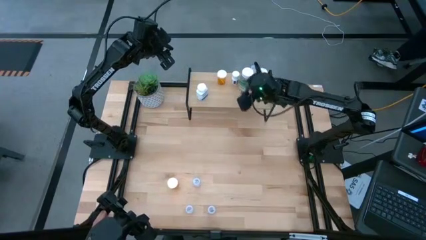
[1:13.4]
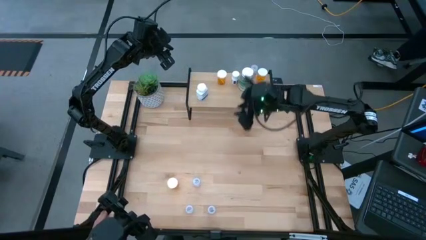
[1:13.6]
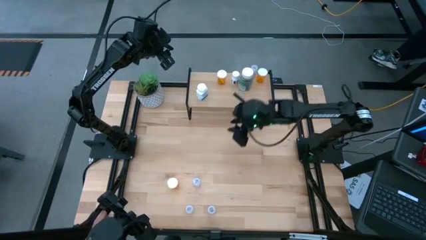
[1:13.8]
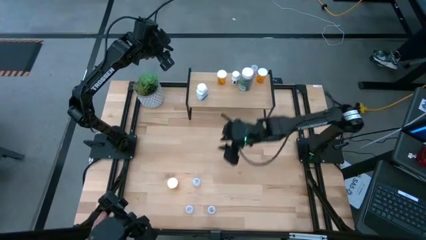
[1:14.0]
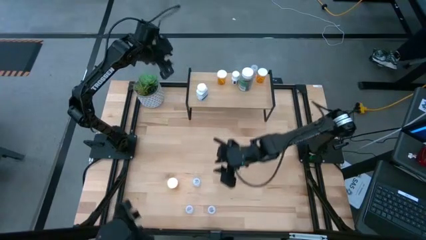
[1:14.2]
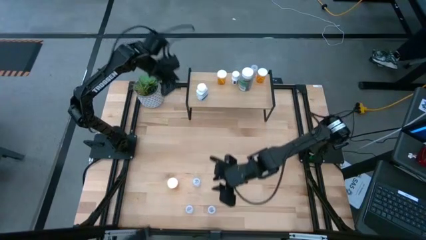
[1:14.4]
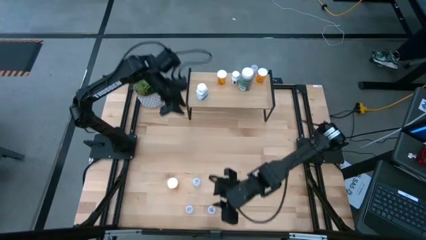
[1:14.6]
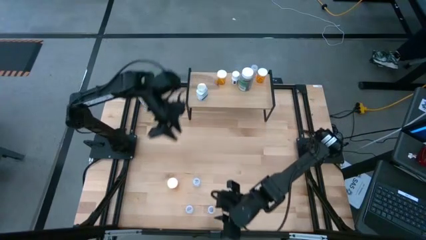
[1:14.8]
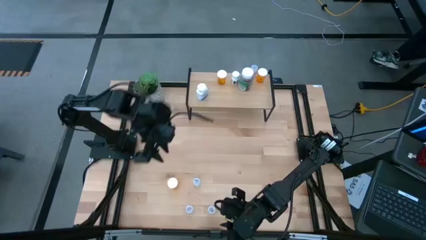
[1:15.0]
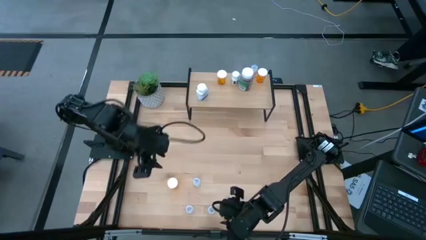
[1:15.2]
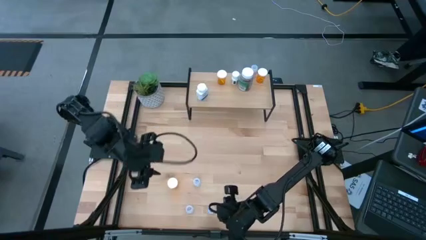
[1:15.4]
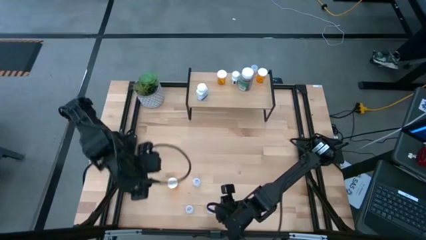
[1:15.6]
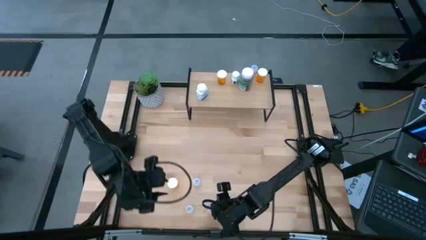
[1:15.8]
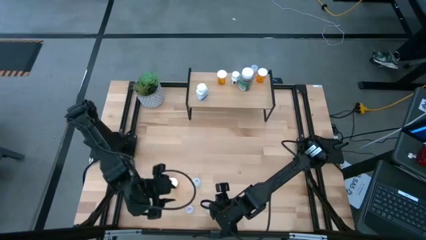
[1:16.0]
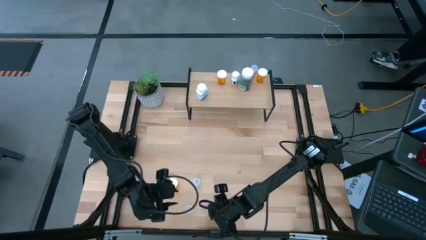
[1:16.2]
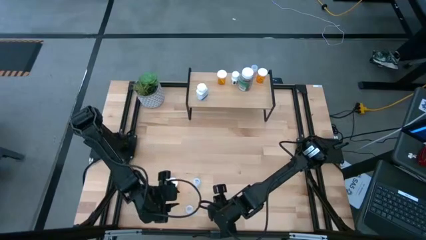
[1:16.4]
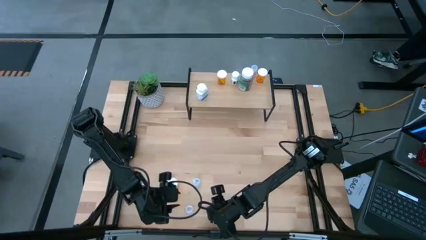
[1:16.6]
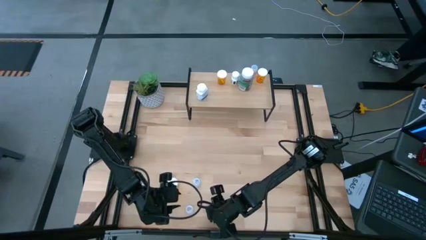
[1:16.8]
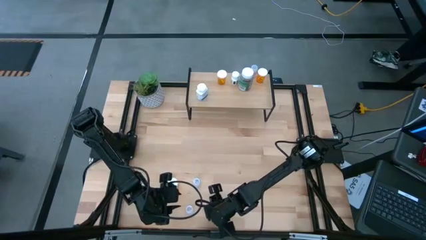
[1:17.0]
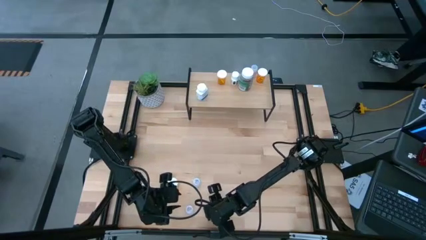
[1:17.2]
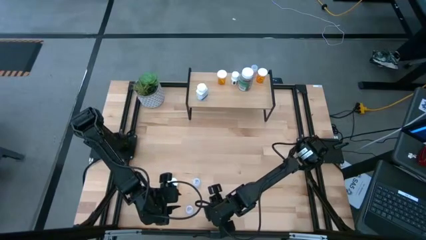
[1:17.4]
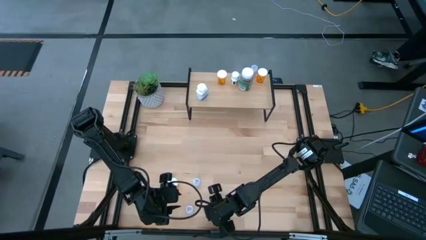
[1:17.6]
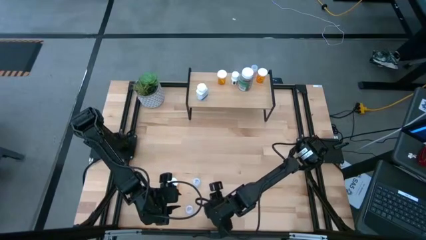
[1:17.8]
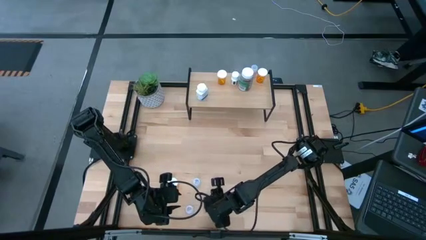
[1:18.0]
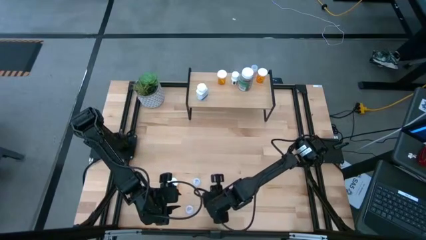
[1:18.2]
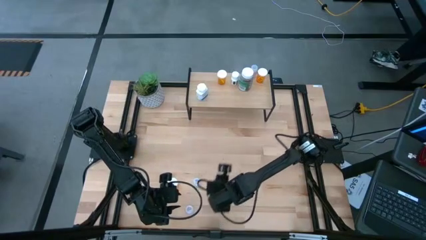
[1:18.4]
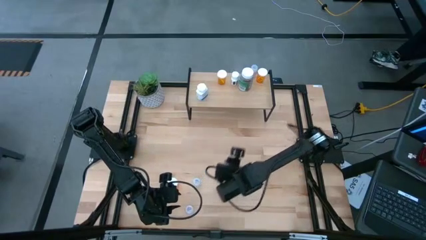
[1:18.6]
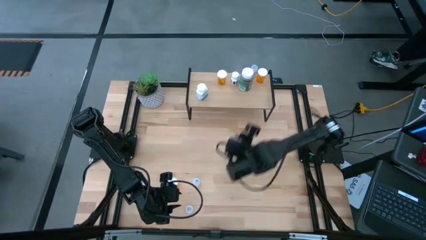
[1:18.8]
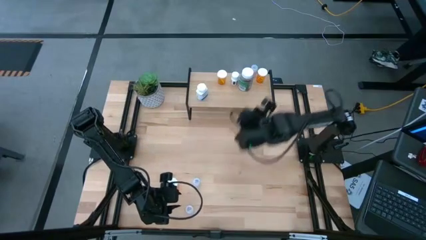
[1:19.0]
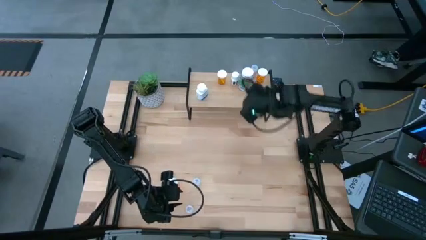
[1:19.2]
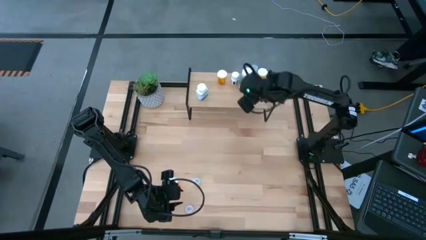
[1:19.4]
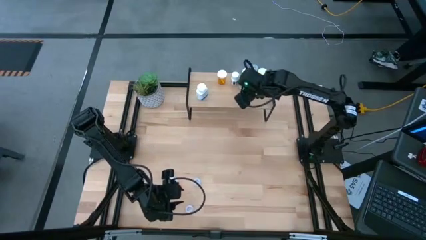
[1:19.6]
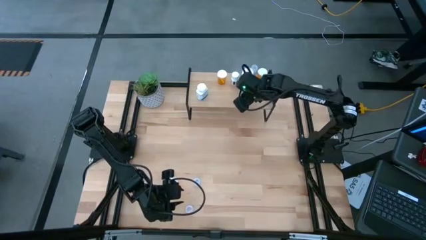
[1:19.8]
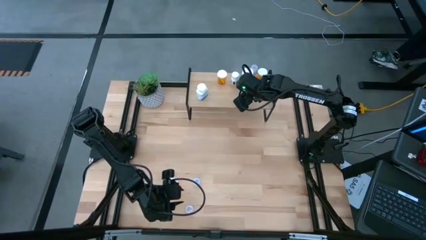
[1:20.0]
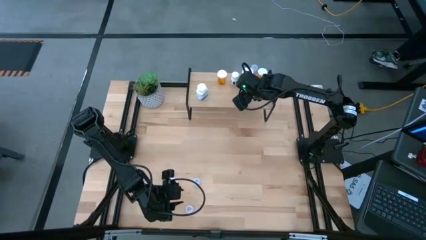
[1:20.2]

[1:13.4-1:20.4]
Task: Pick and place medicine bottles onto shelf by color
Put the transparent pill bottle on the shelf

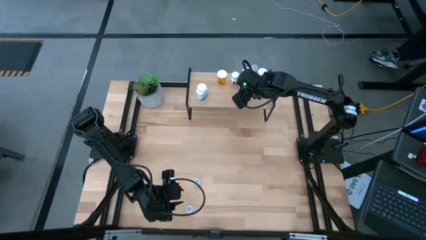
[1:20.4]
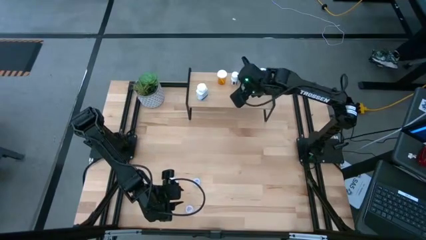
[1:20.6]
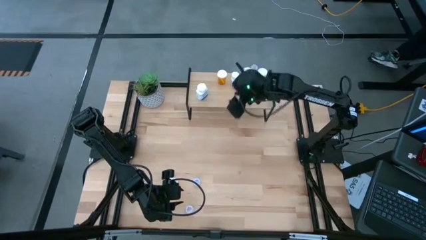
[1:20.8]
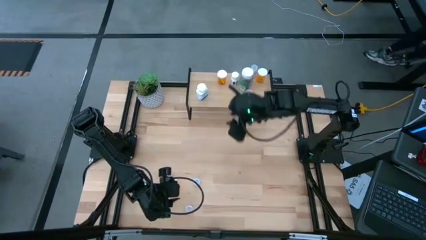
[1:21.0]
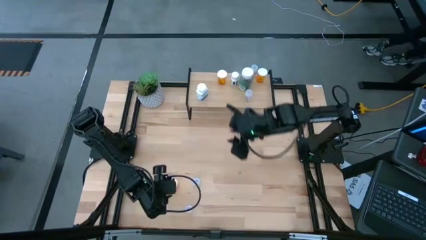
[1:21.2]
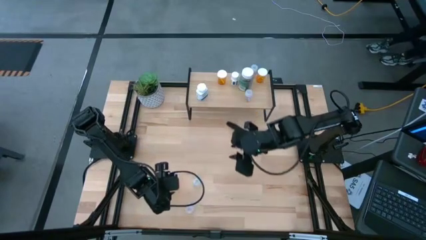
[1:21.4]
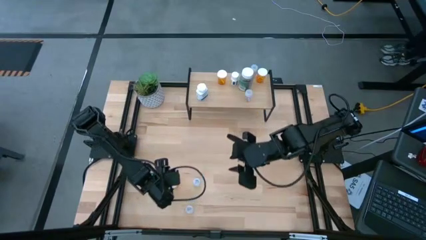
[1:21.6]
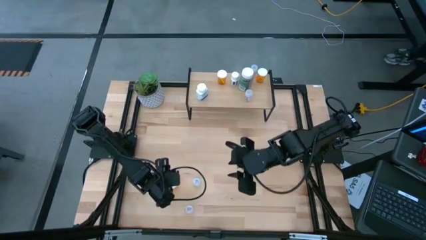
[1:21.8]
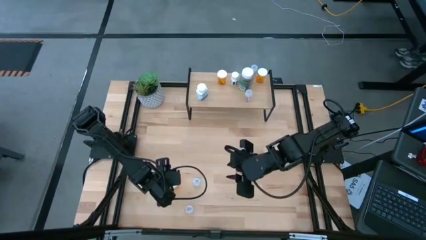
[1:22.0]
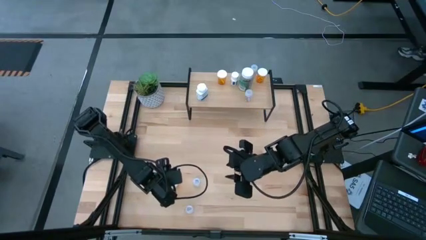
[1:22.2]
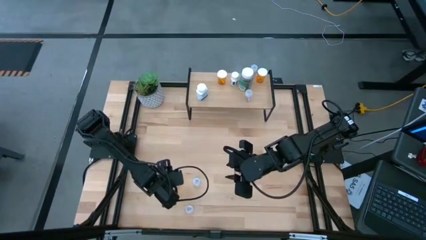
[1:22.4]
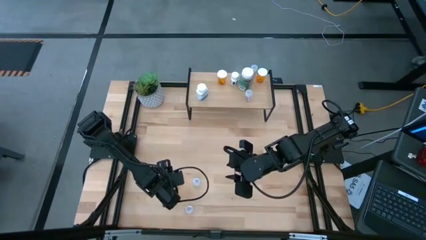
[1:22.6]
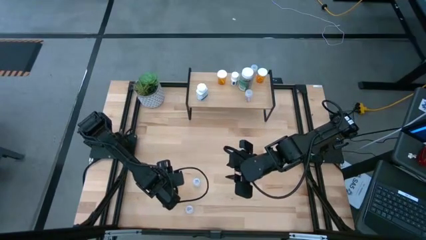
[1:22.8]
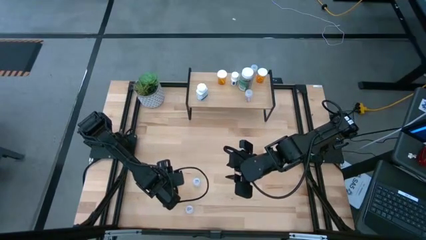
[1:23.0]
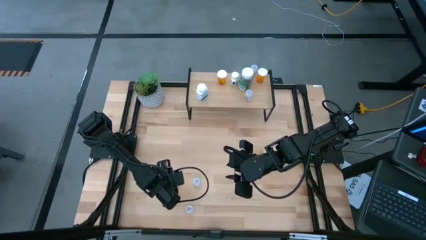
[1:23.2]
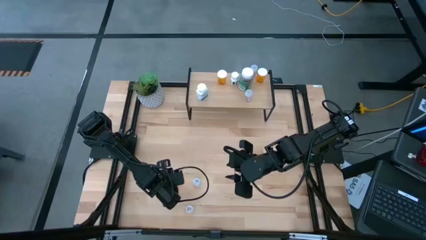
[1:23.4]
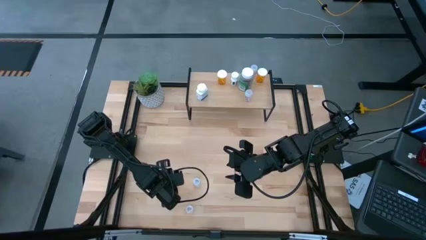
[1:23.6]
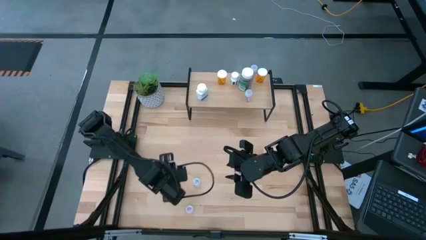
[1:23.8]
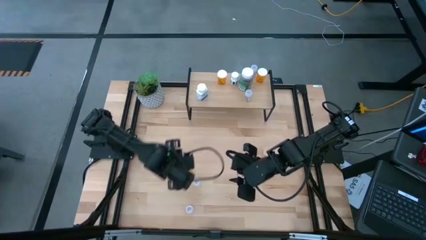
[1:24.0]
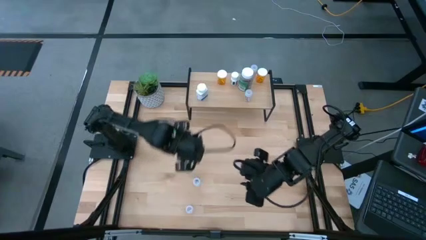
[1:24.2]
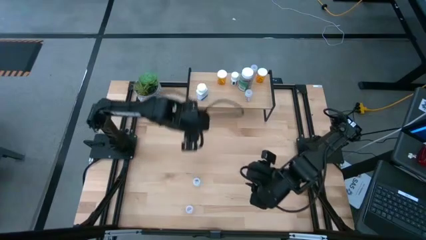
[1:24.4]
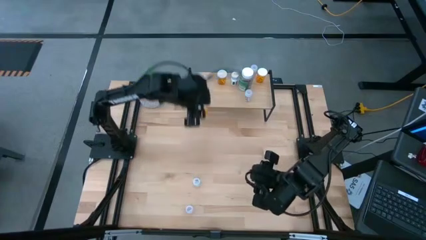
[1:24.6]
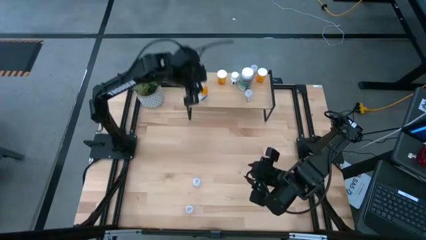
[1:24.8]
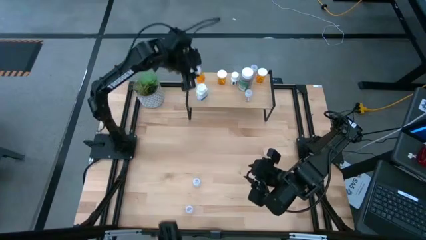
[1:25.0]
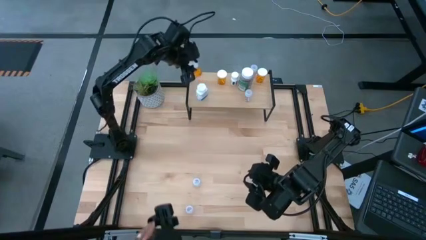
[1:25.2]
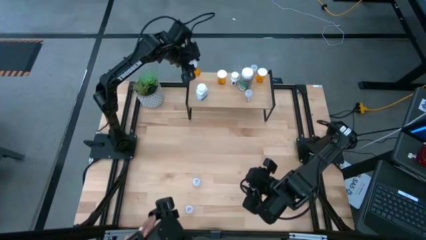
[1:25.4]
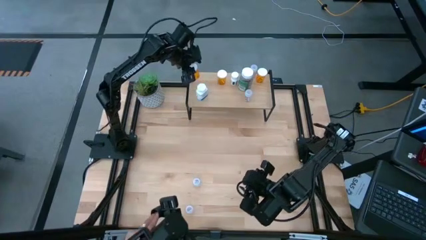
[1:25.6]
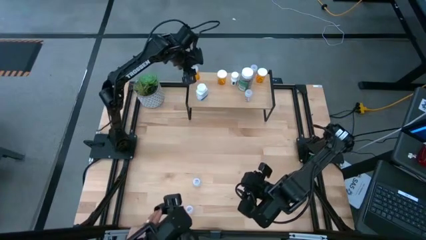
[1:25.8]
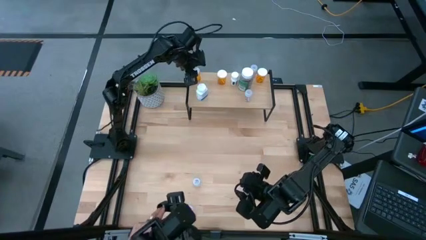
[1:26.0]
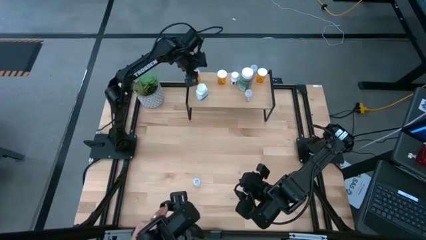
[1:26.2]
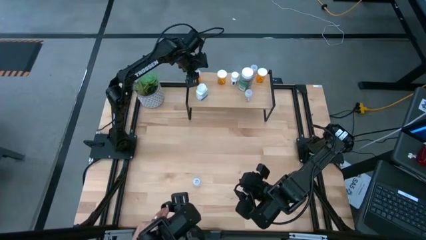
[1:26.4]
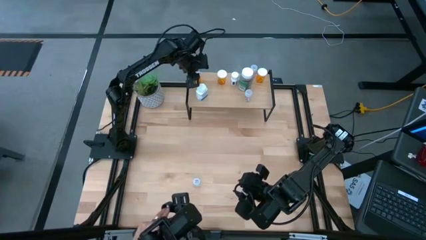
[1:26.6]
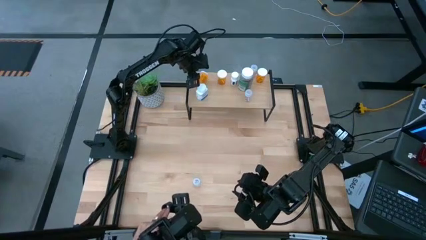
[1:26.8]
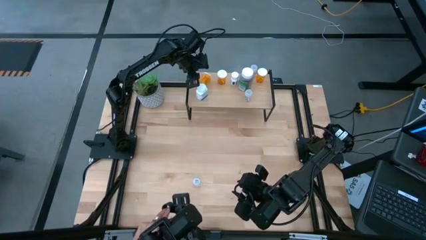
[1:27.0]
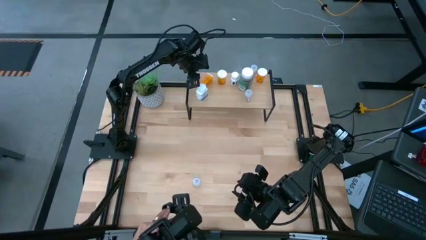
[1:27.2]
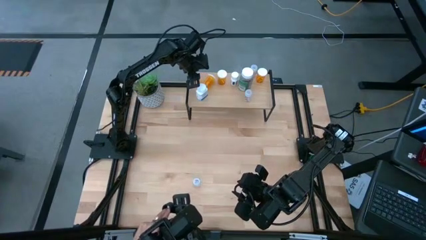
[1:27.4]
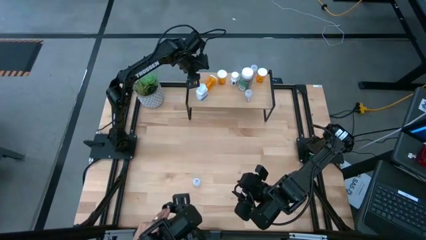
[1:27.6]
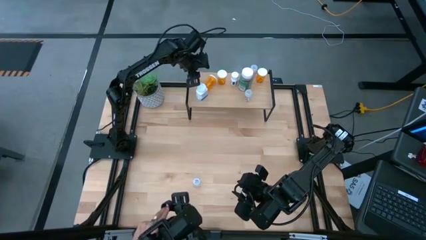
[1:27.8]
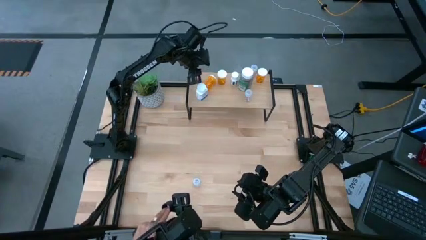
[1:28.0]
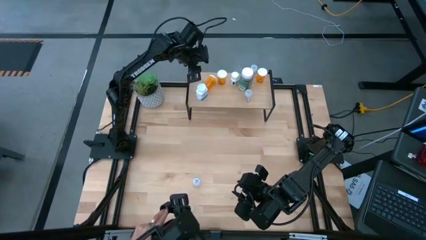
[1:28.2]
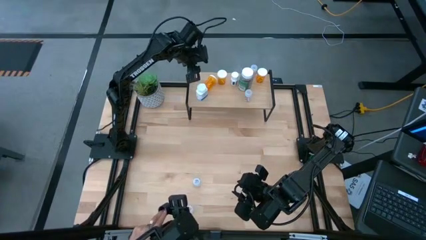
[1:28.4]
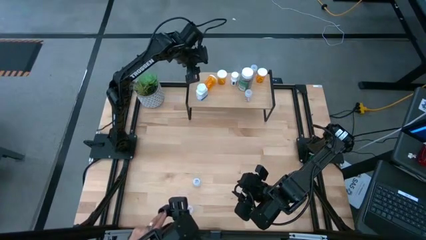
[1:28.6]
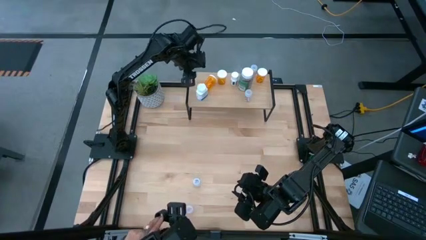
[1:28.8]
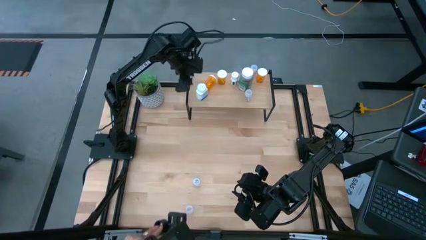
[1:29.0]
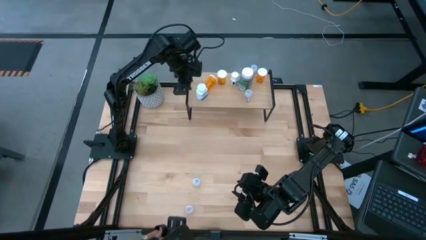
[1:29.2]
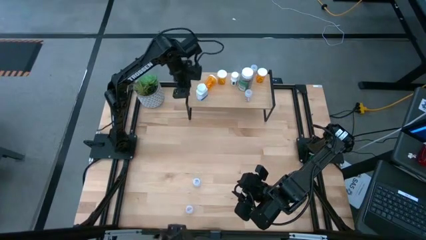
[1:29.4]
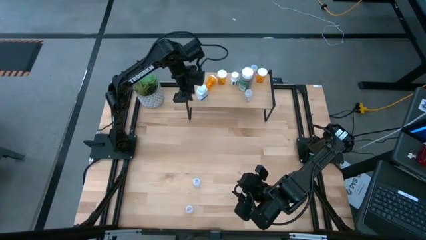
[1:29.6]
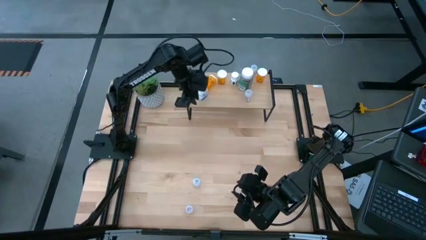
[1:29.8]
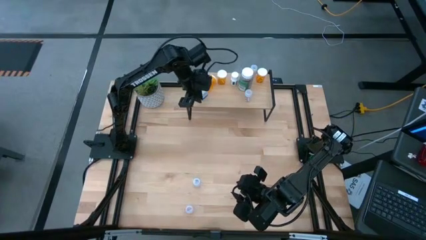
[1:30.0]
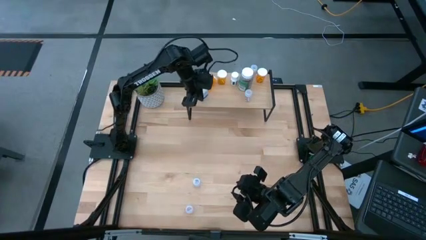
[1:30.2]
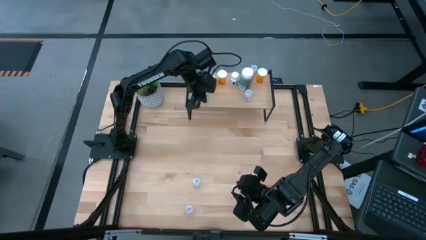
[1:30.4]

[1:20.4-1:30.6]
Put the orange pill bottle on the shelf
